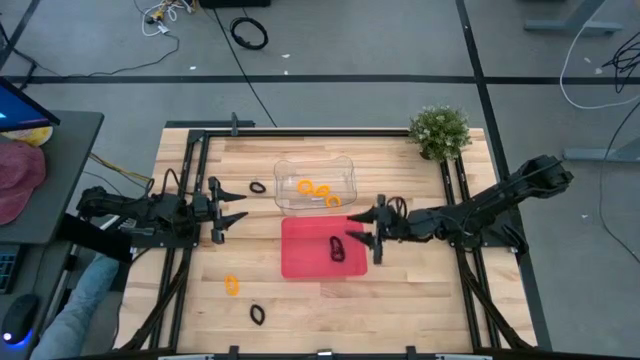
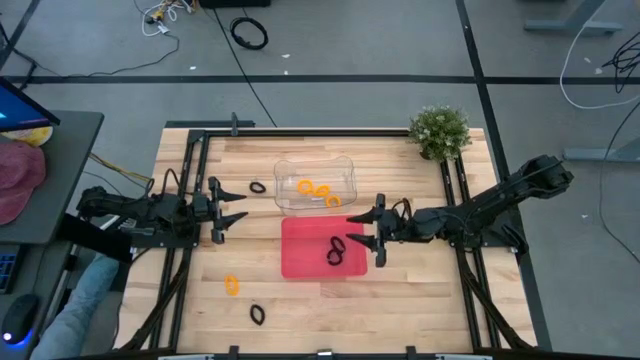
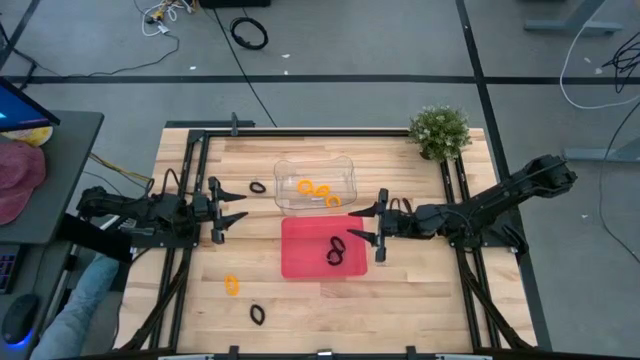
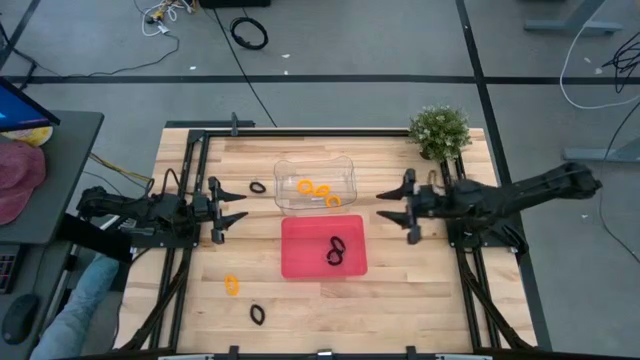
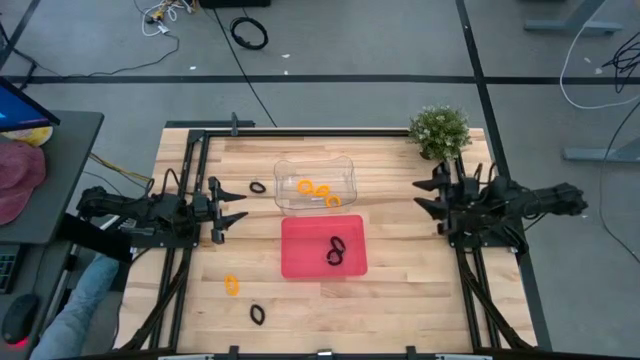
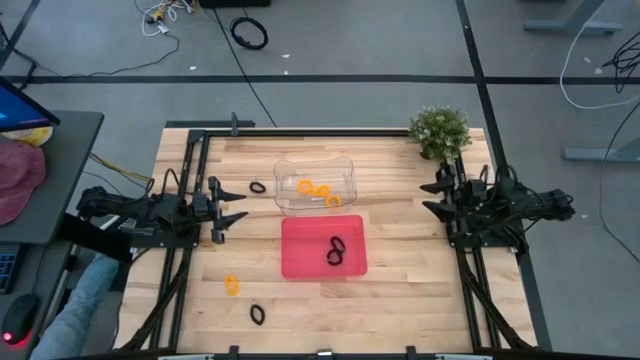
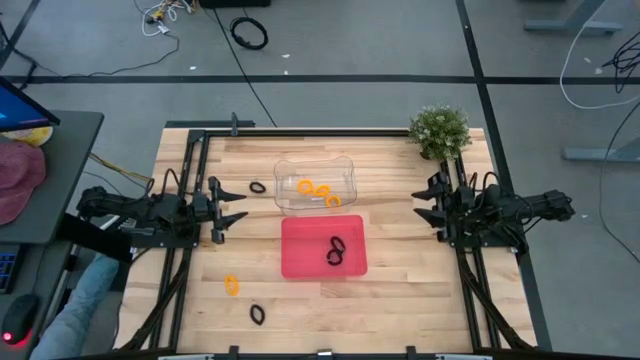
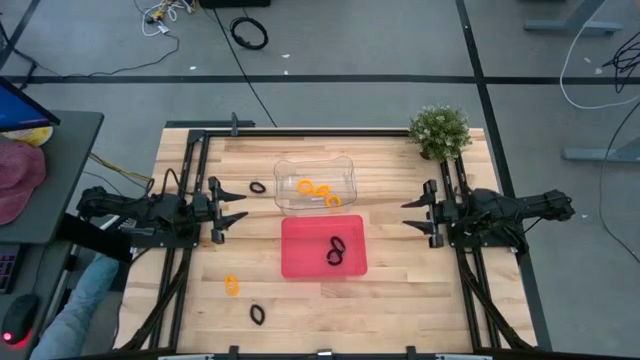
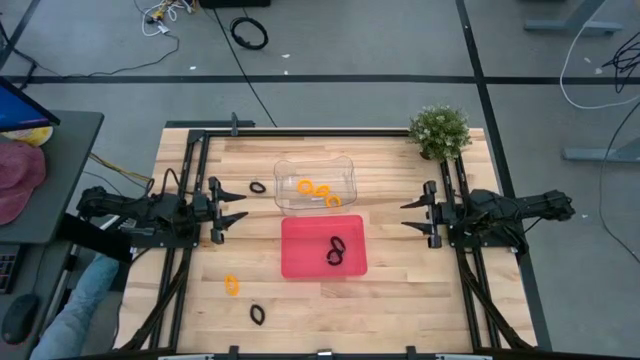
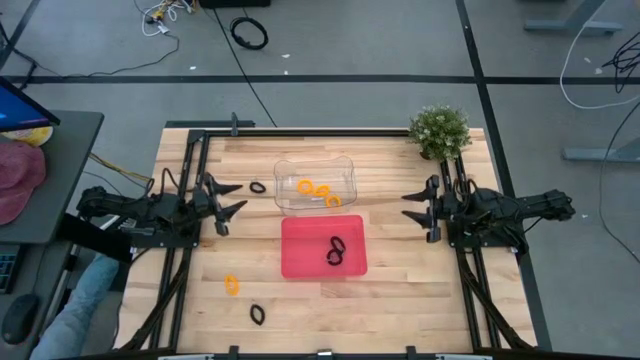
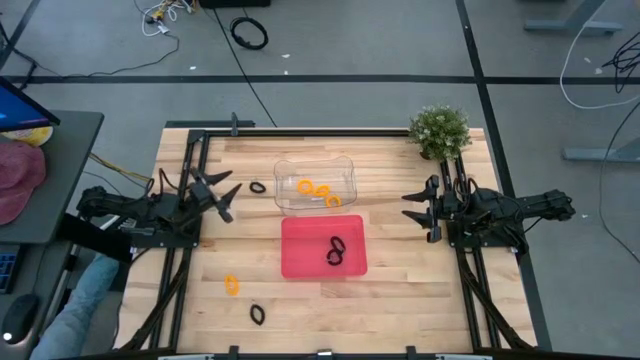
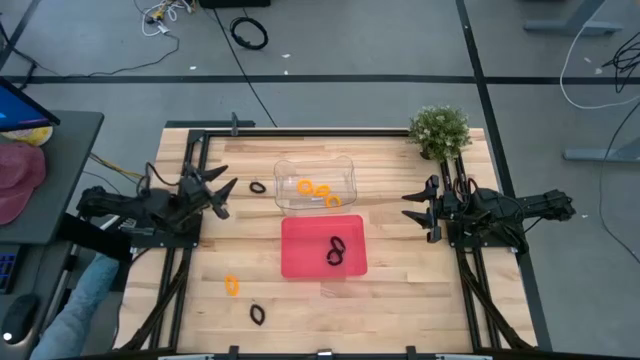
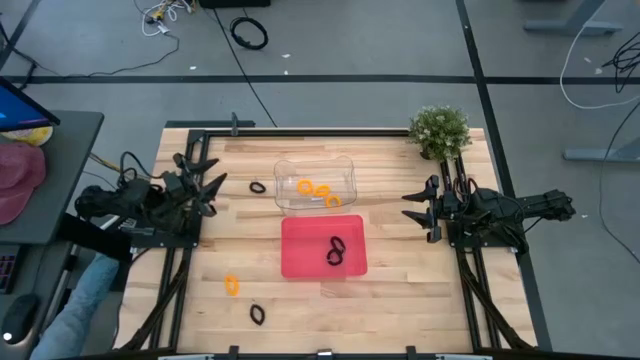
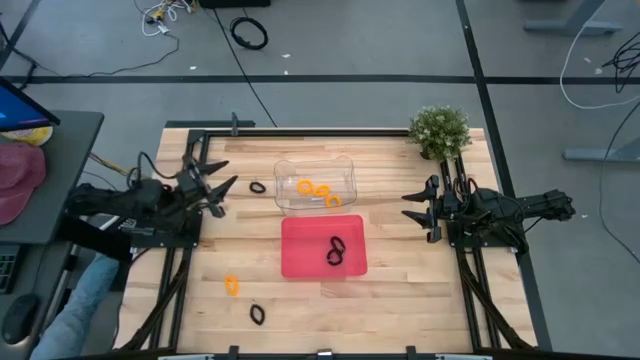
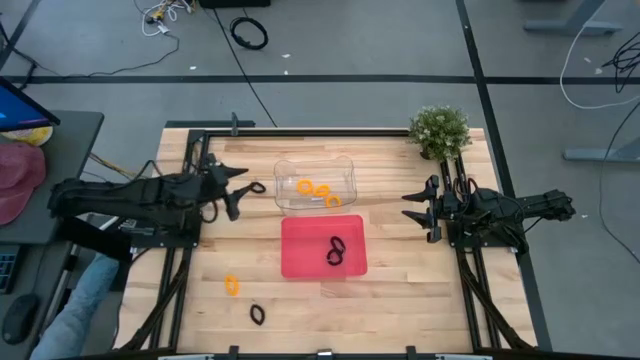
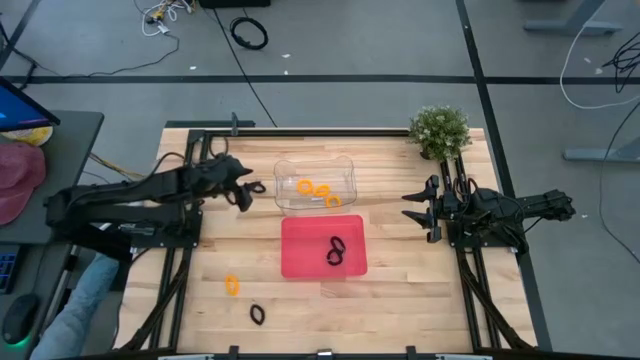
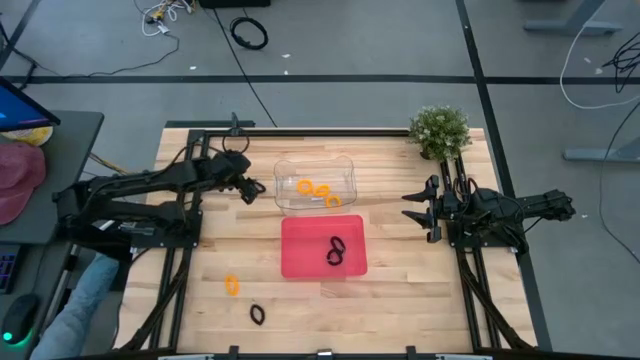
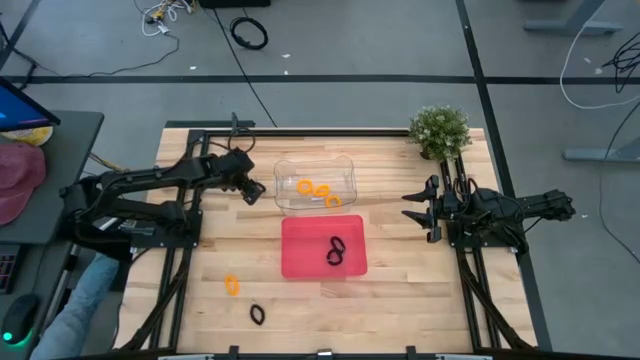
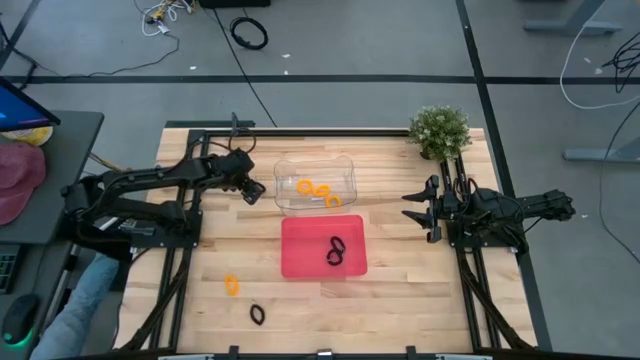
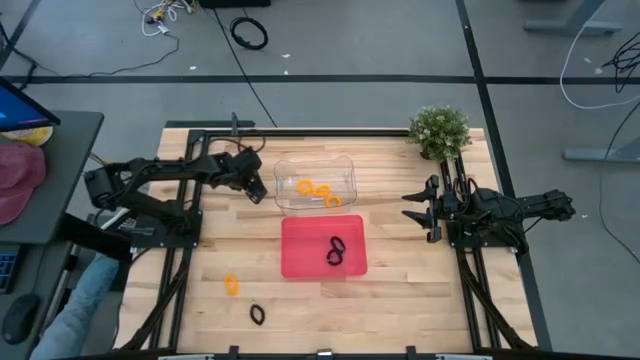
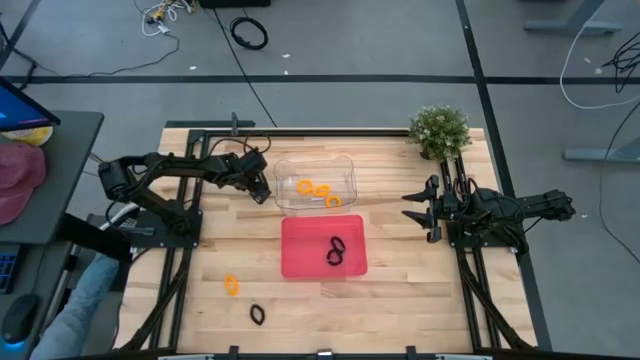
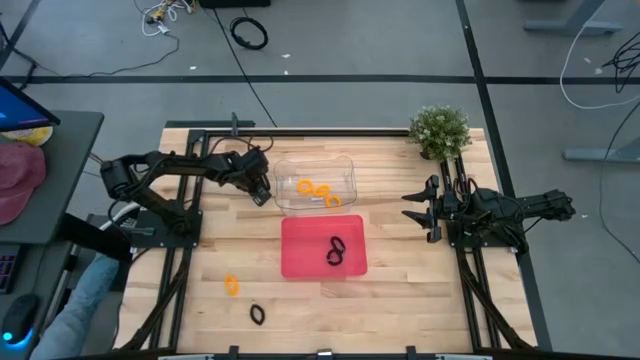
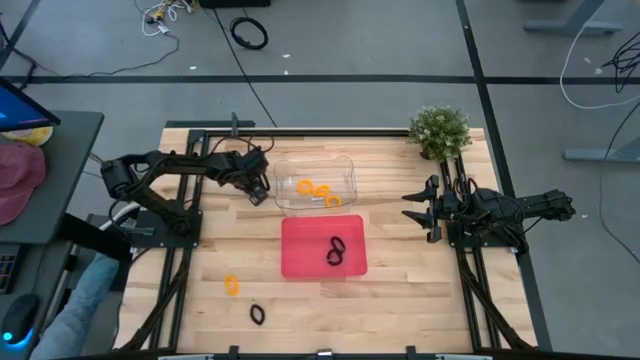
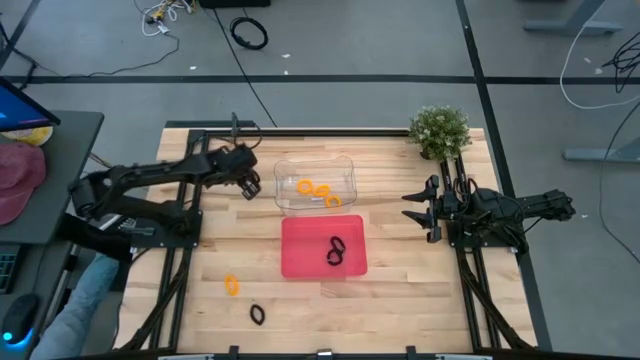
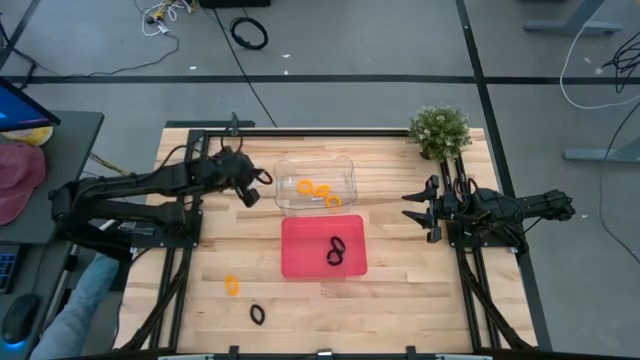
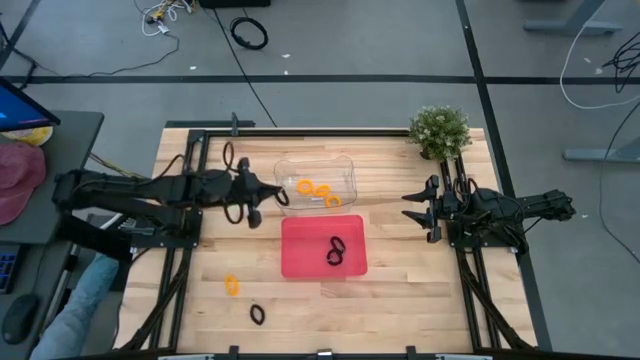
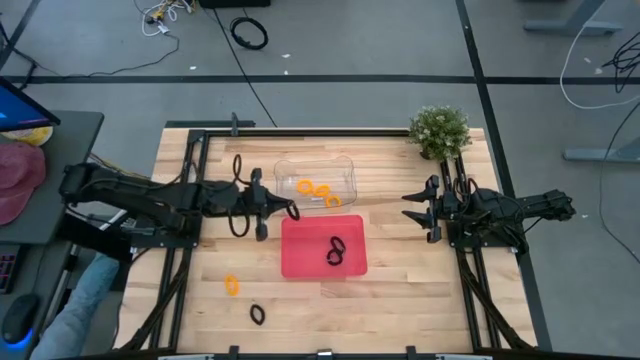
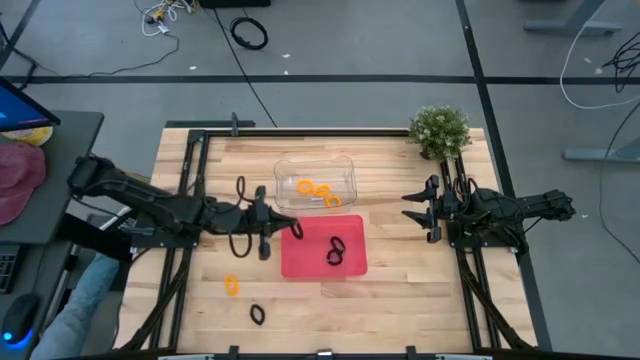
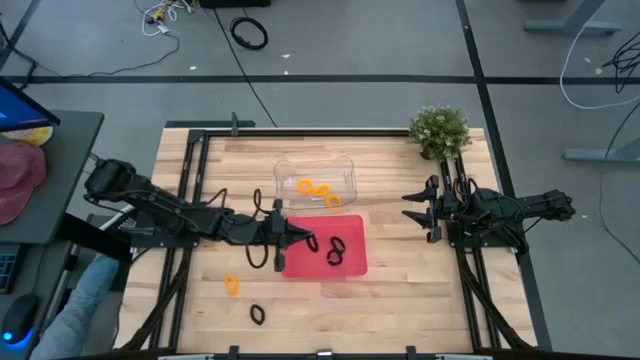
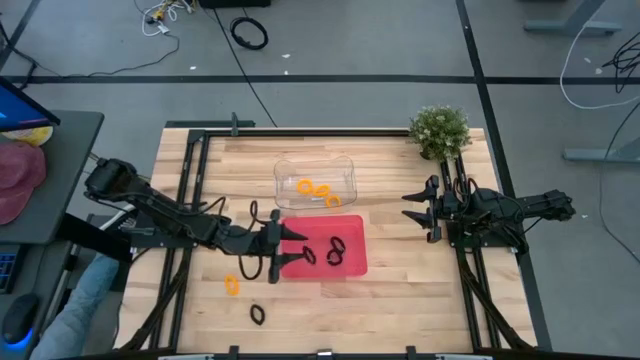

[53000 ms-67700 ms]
Task: Sort spring keychains
Put the black spring keychain into the transparent bin

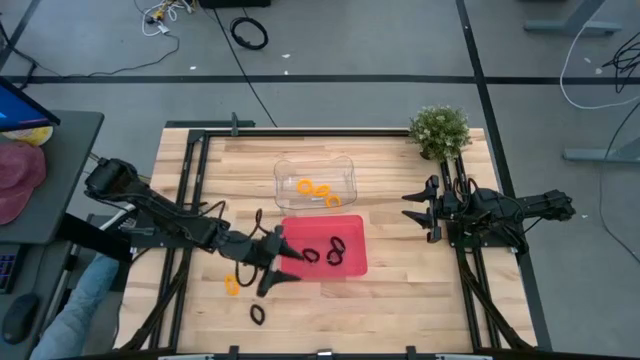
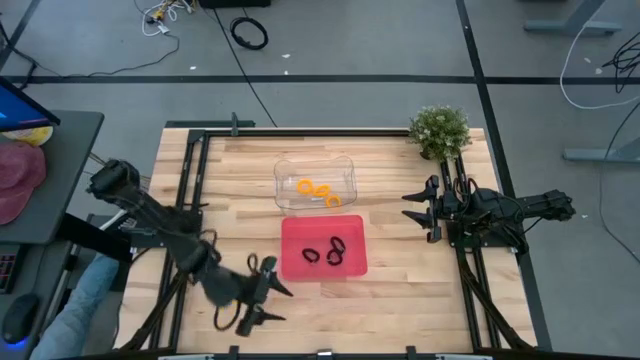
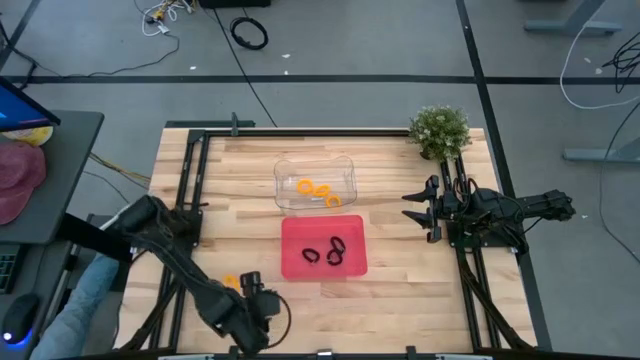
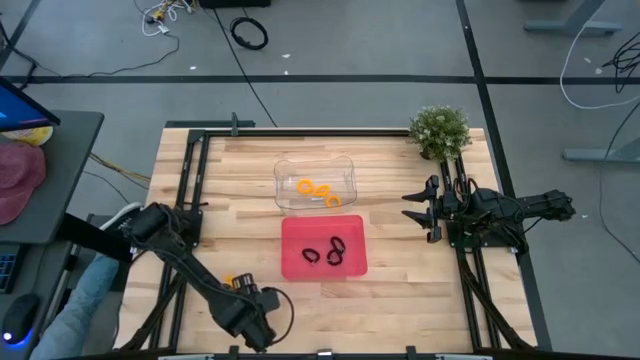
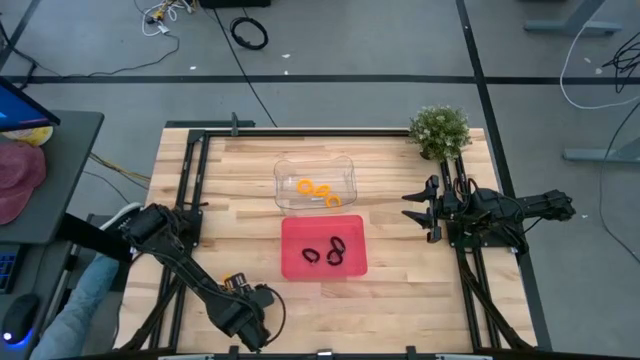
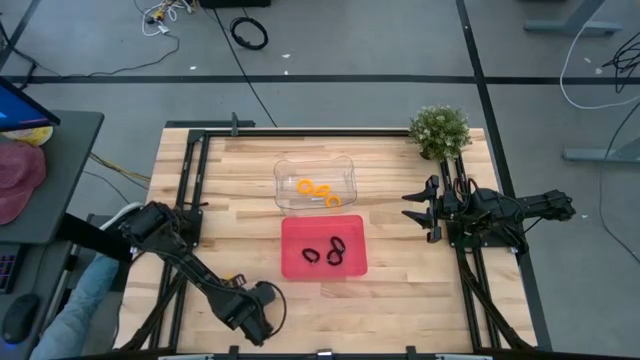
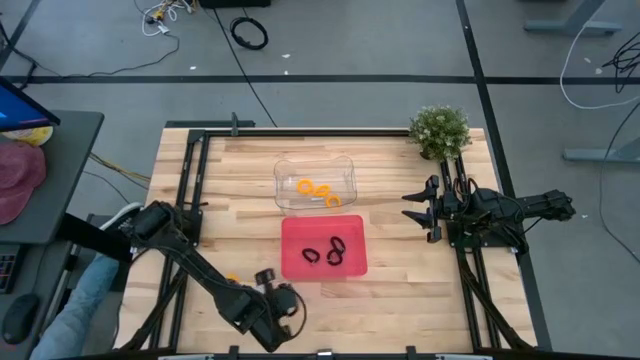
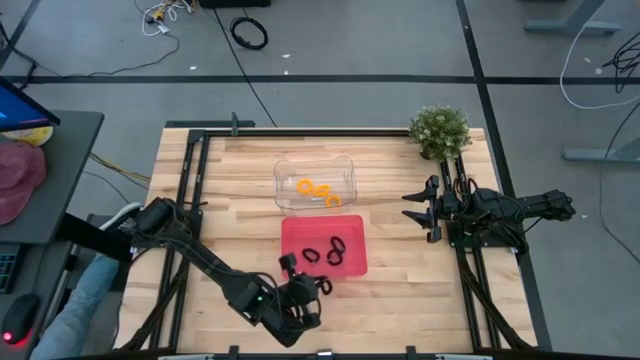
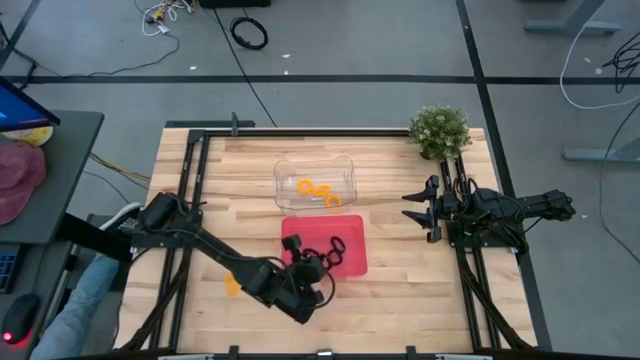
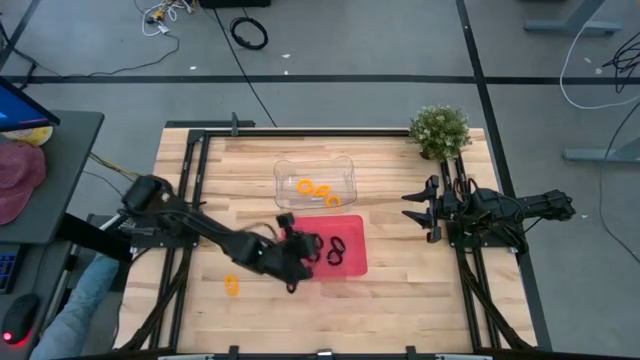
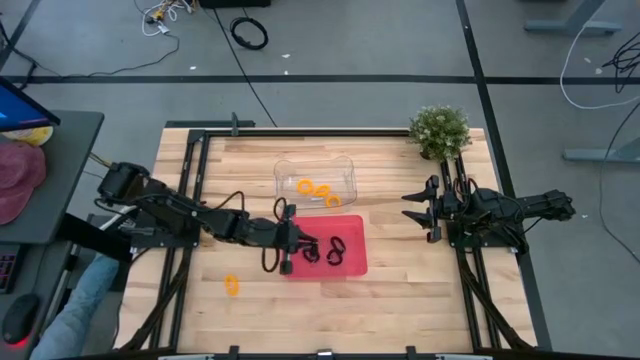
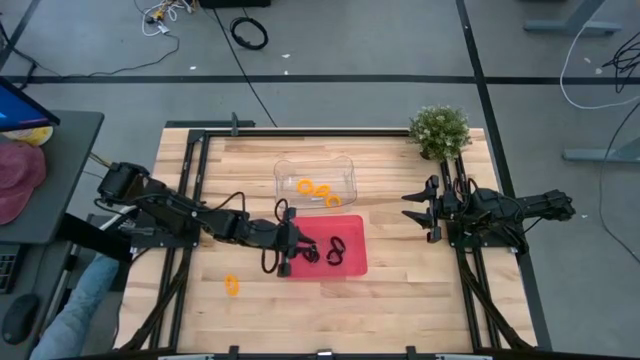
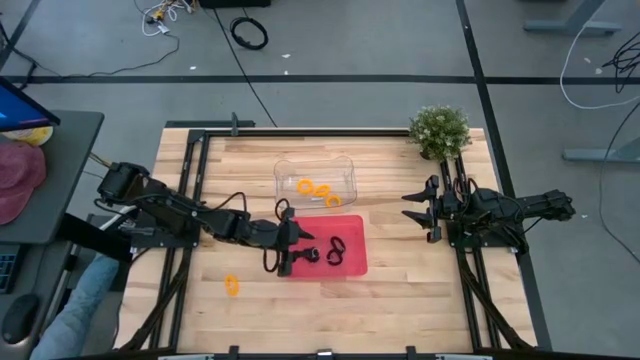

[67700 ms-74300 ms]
Put the black spring keychain into the transparent bin

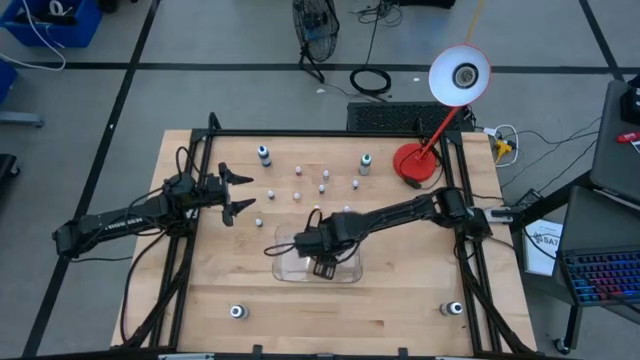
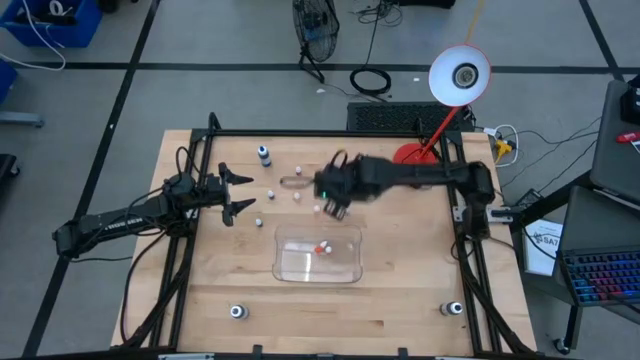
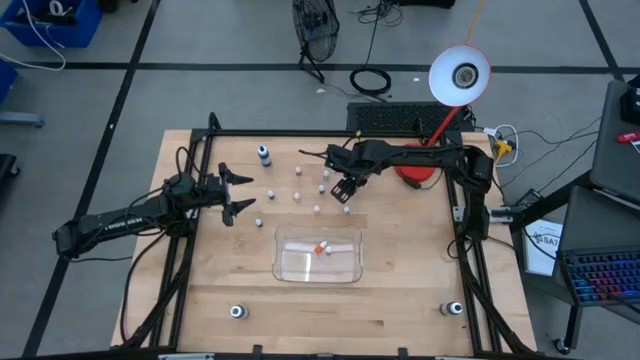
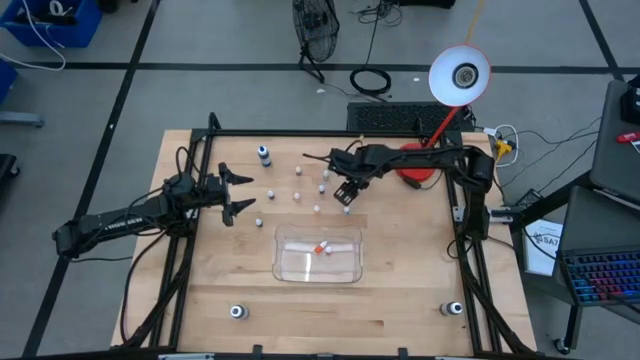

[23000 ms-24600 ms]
Task: Pick & Place food coloring
Put the small blue food coloring bottle into the transparent bin
